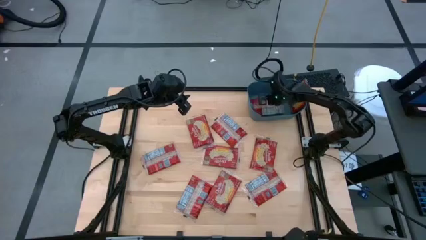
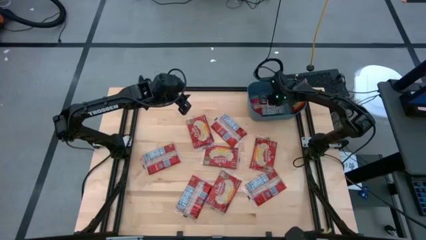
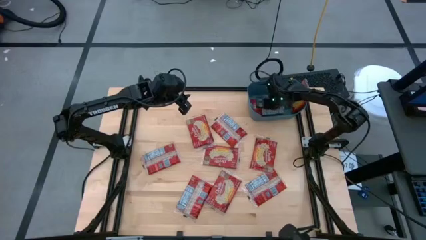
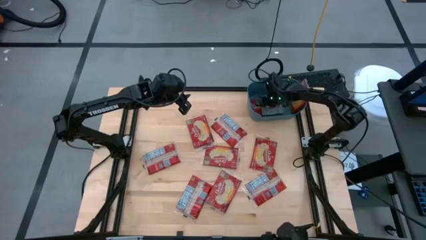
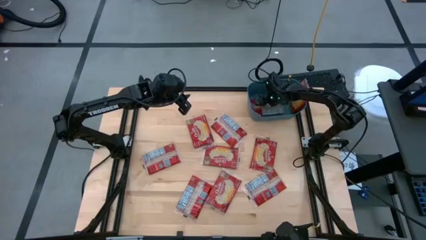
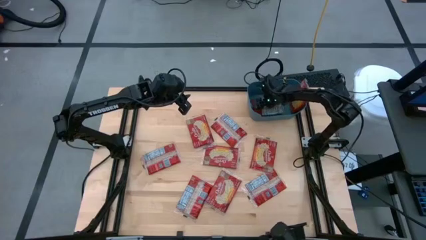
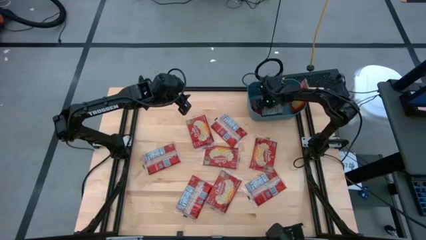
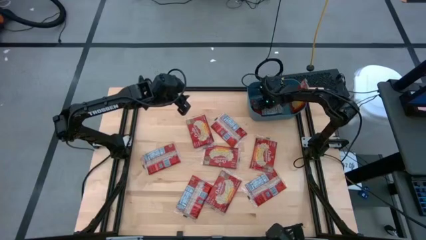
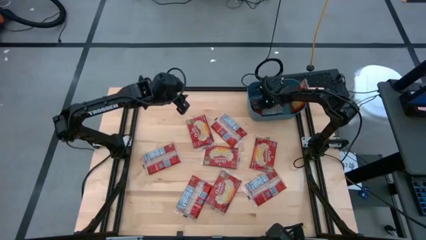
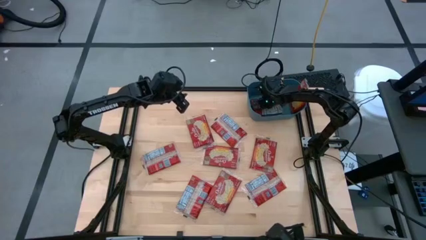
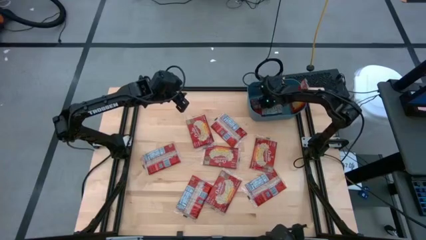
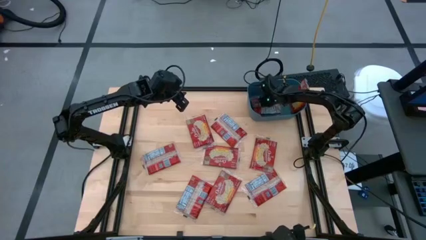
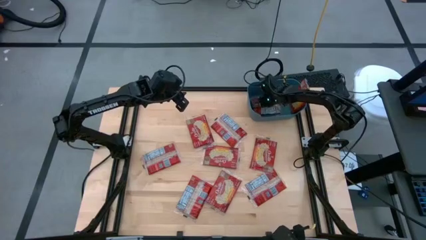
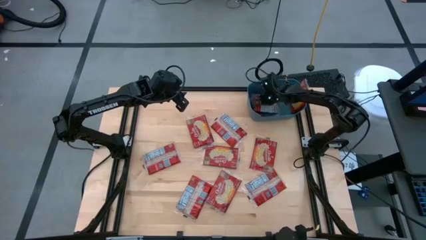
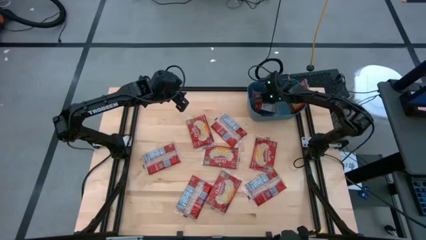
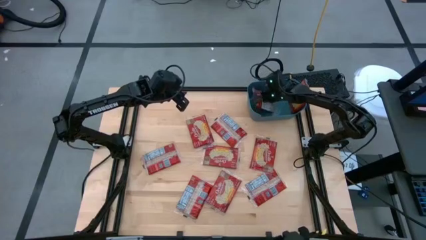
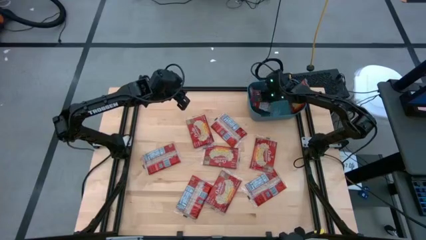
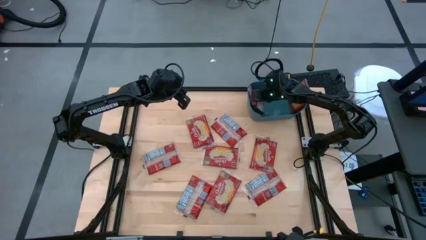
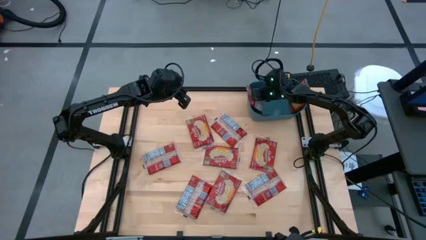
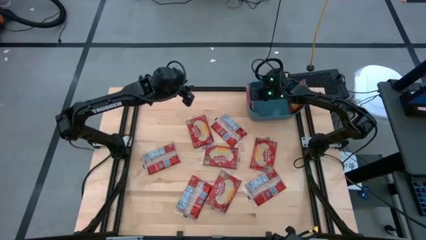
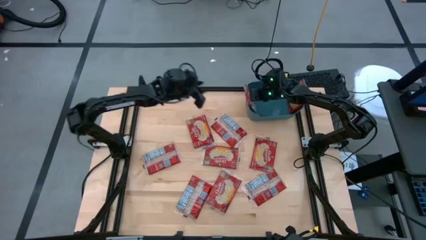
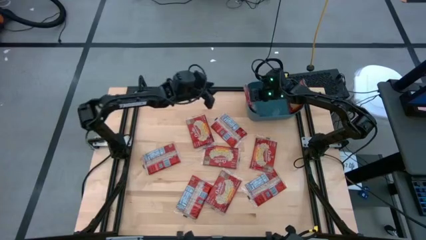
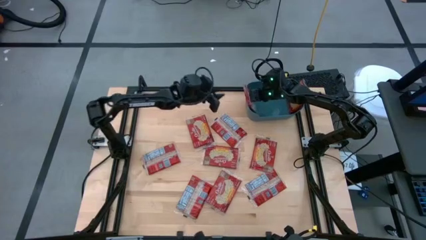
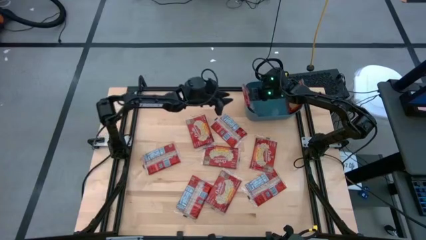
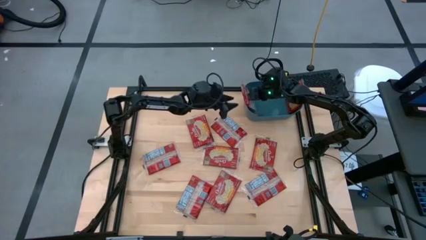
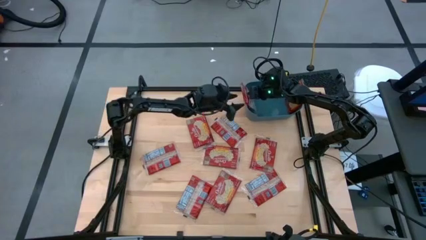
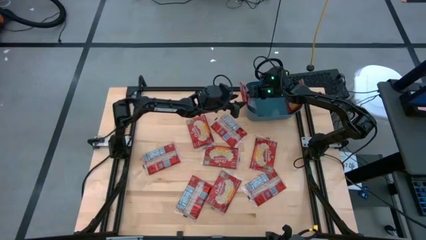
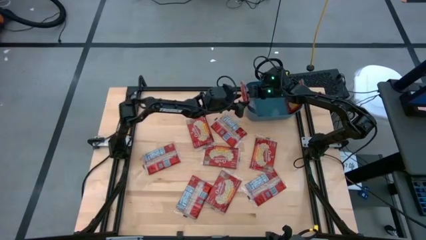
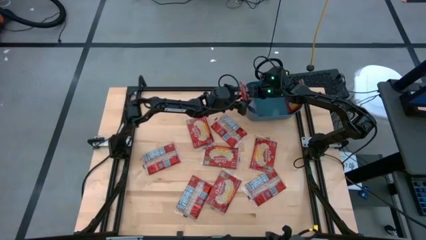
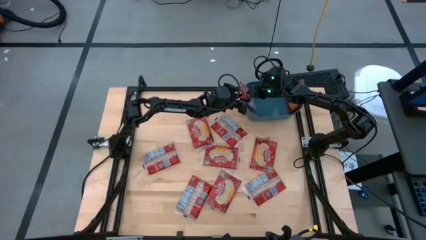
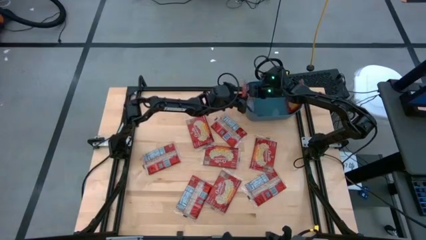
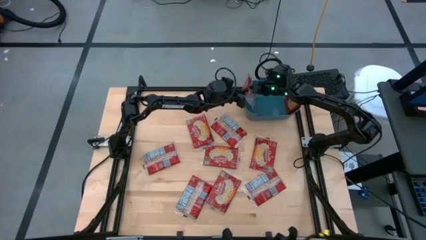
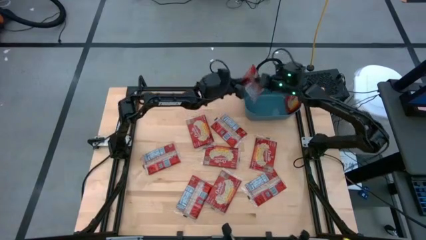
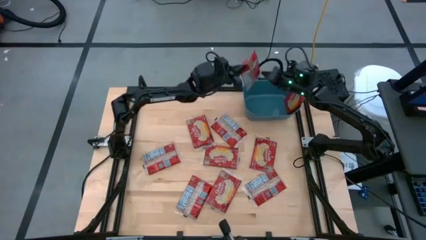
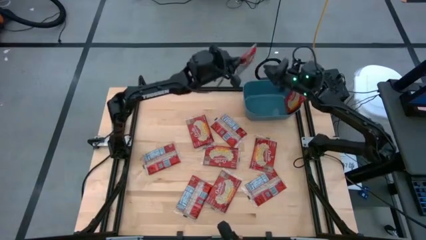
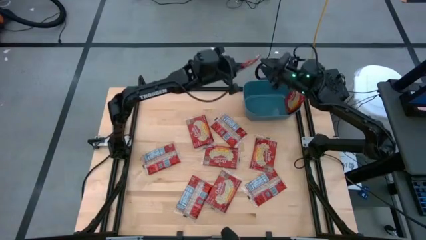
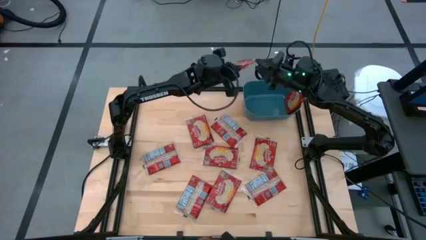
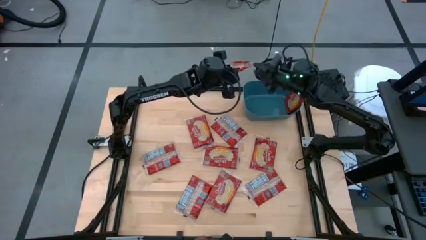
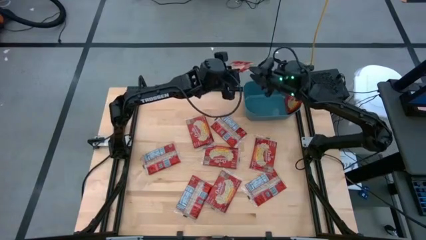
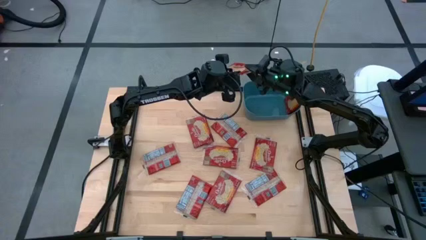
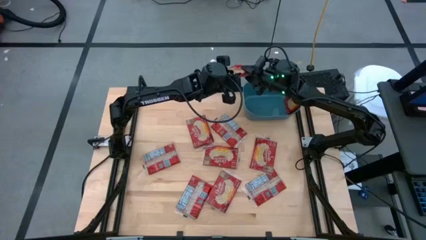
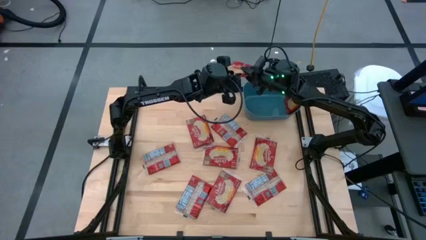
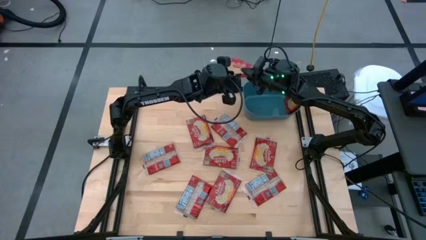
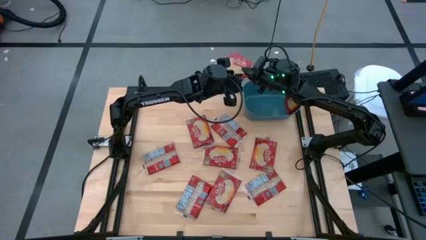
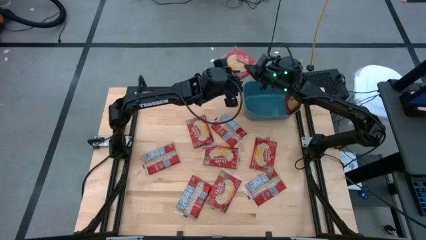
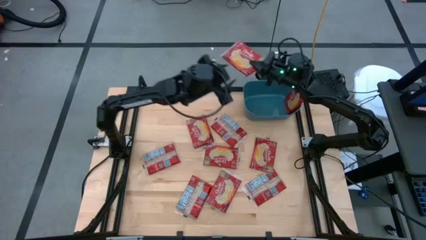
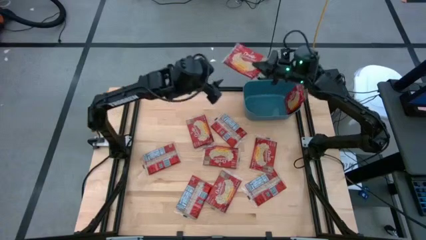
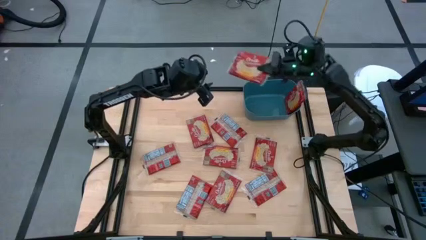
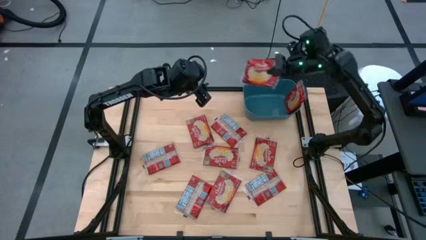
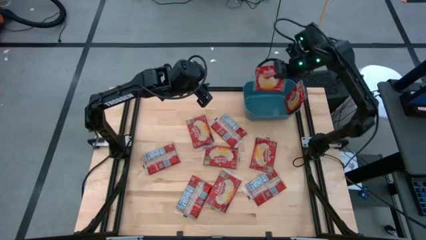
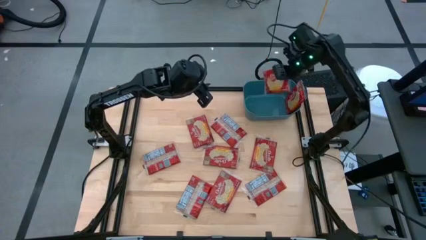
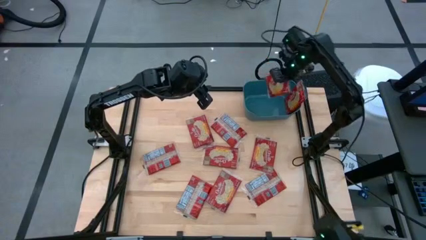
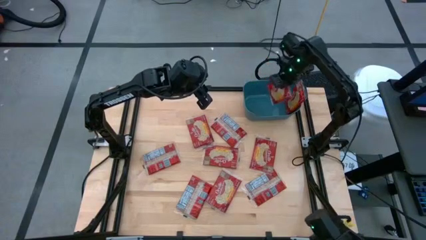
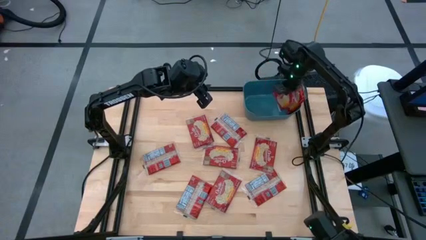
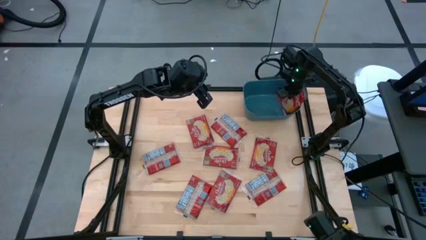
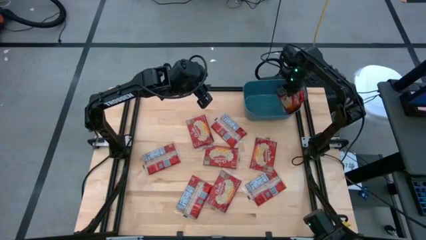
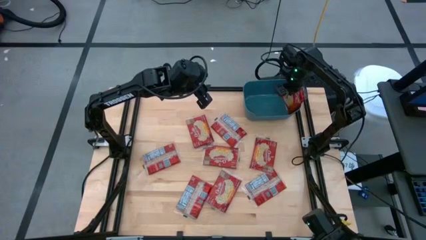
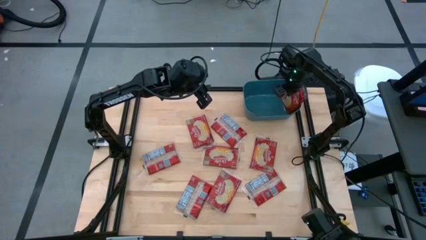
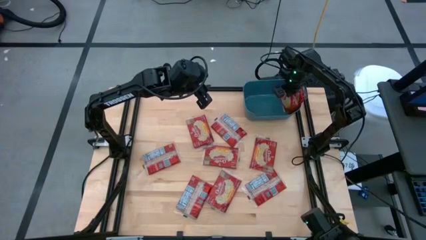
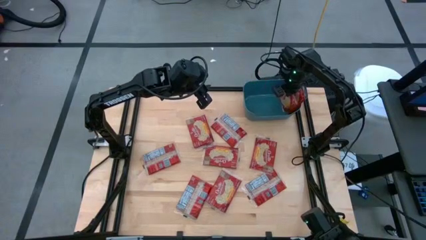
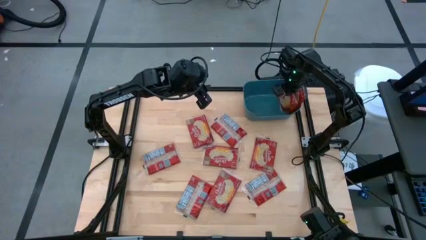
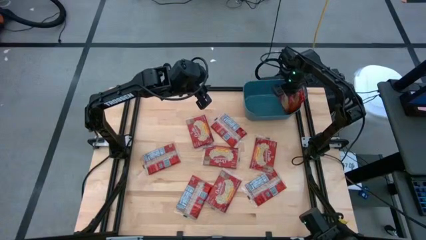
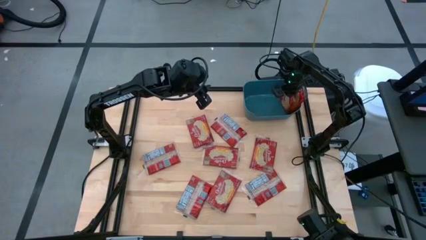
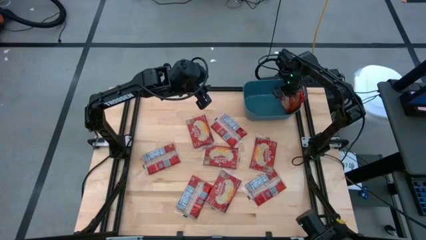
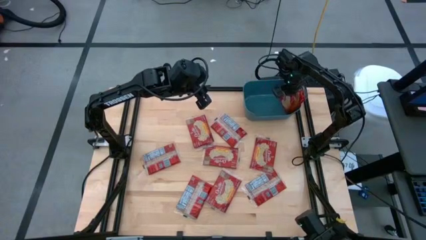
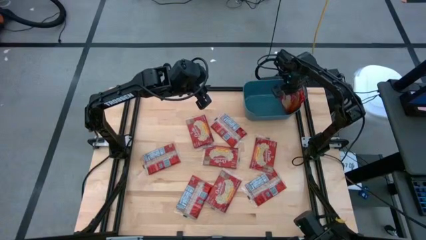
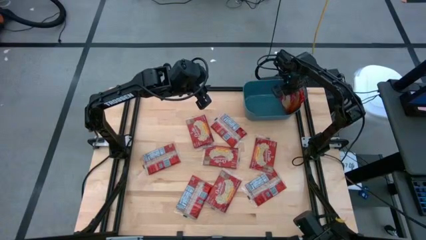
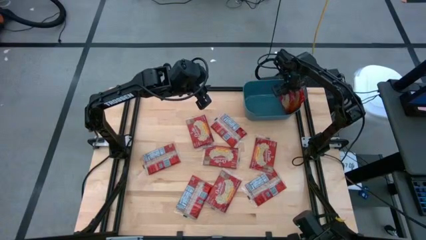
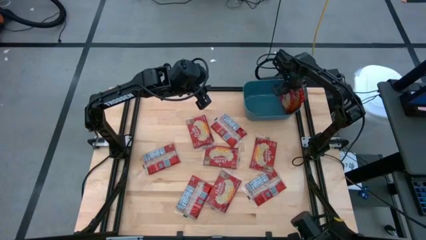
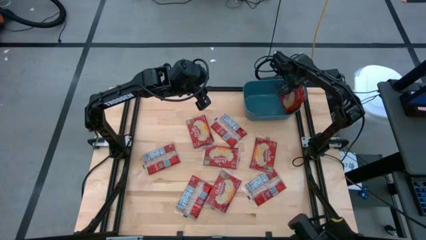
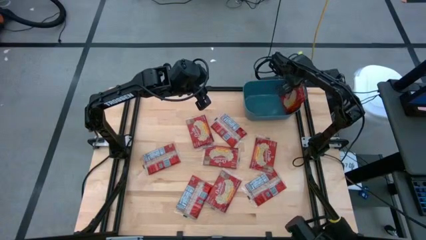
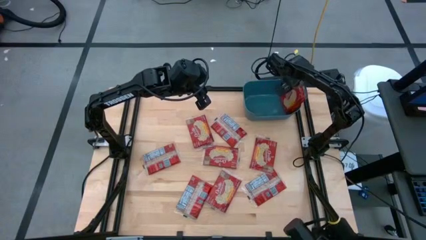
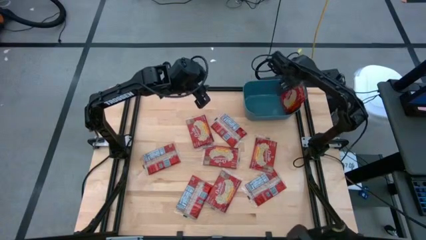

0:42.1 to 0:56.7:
Task: Sort popcorn bags into baskets
Adjust the popcorn bag into the blue bin

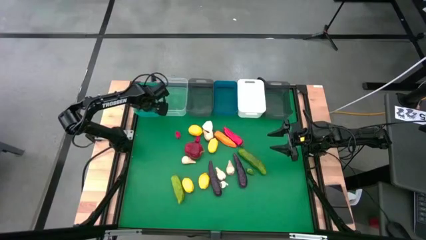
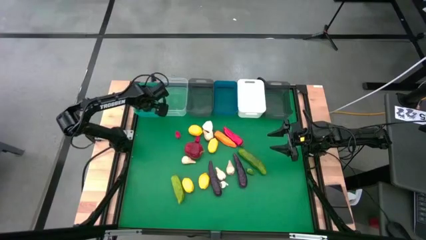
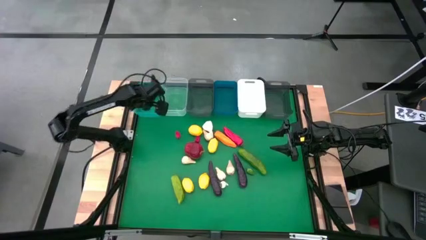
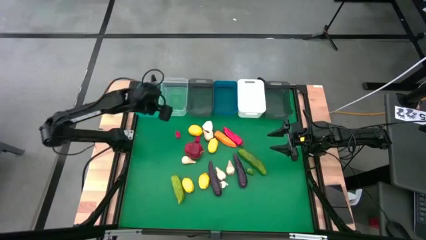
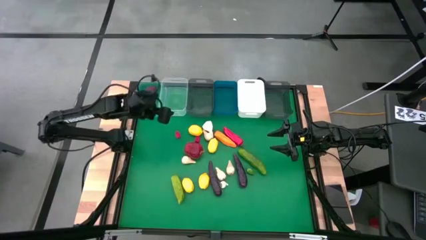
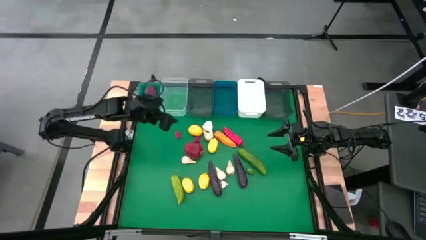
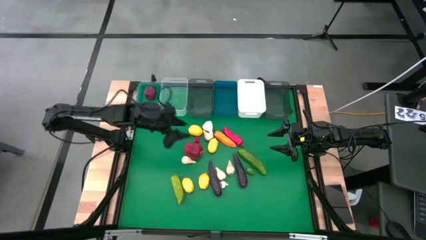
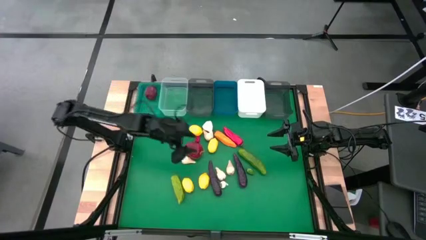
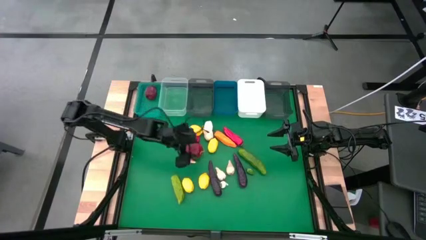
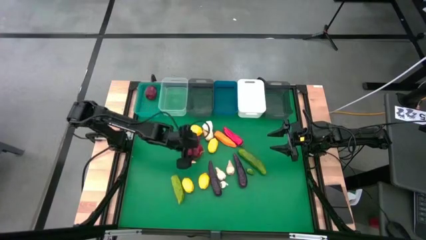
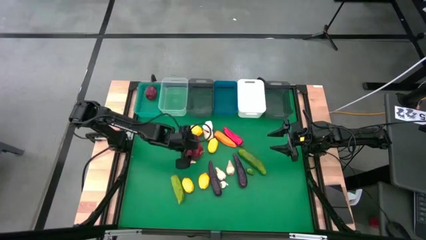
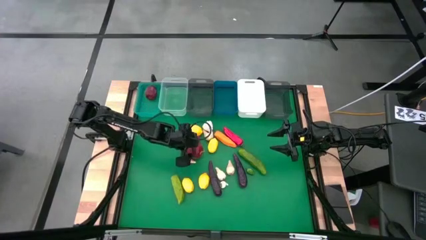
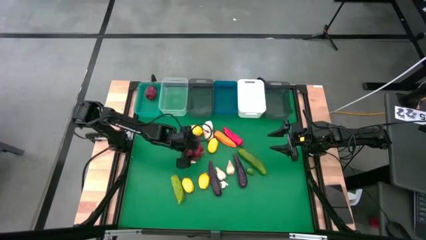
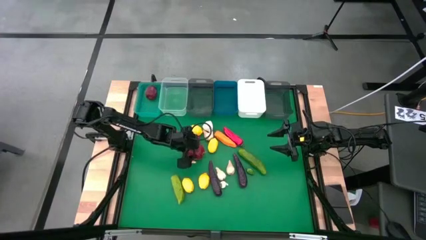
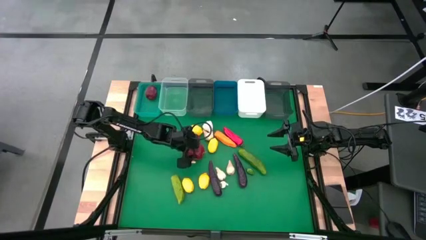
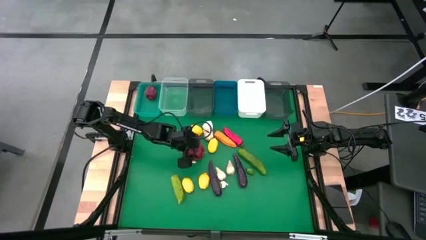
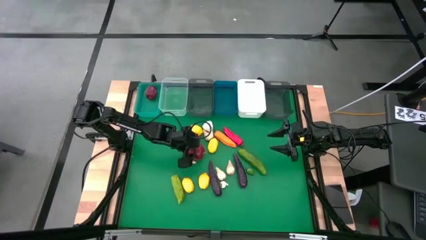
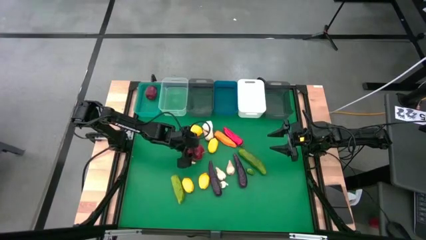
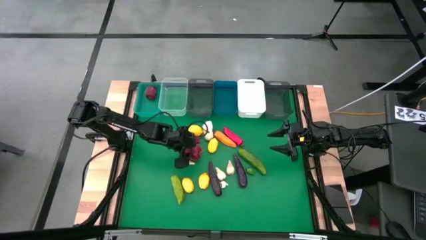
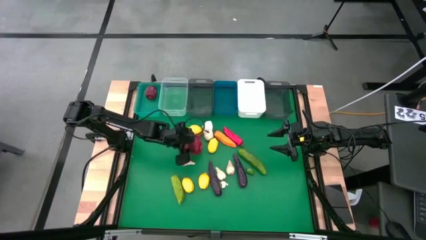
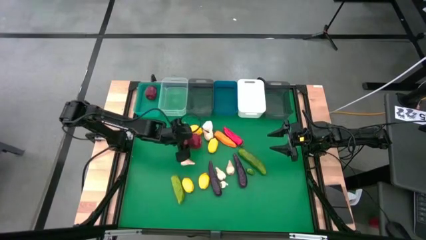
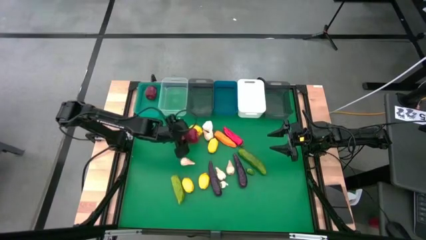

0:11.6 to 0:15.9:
Task: Sort produce into baskets
Put the apple into the green bin
